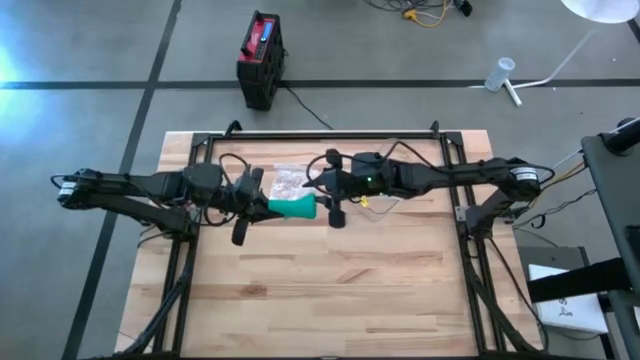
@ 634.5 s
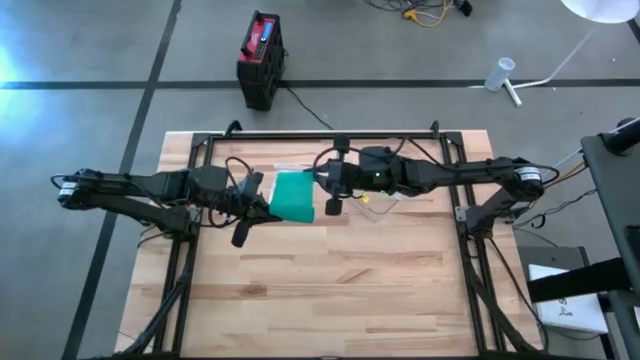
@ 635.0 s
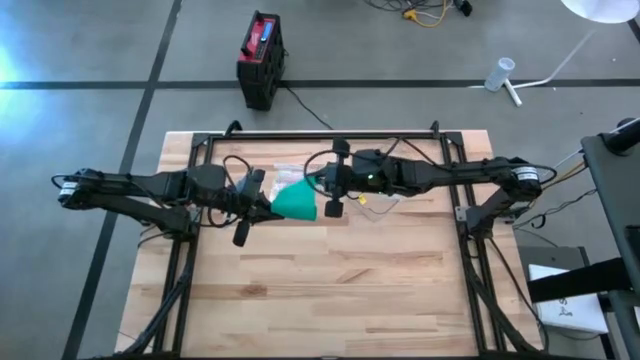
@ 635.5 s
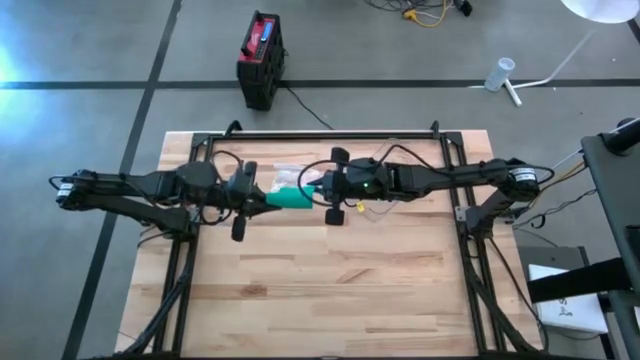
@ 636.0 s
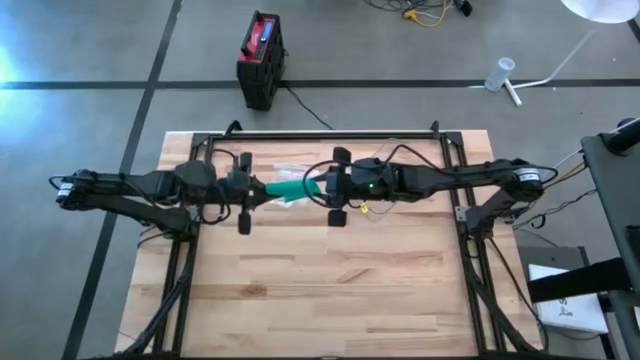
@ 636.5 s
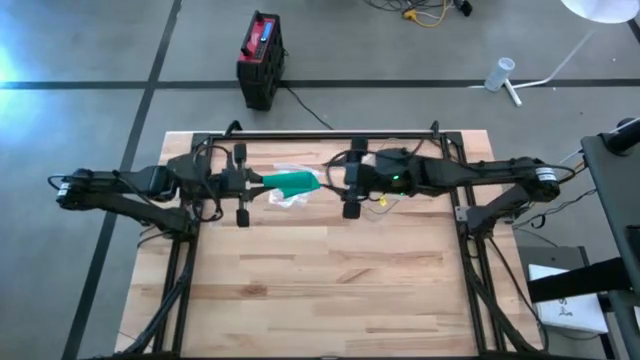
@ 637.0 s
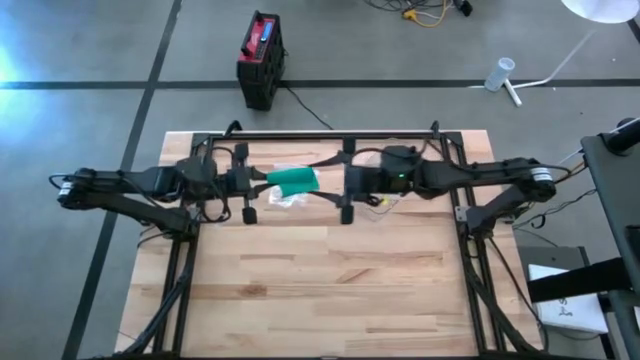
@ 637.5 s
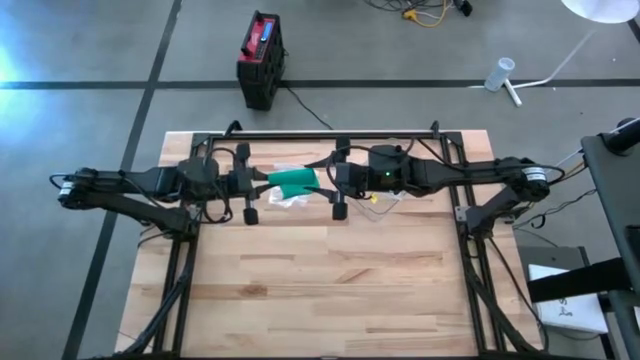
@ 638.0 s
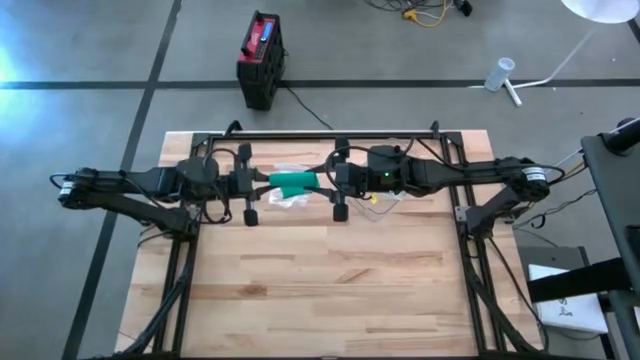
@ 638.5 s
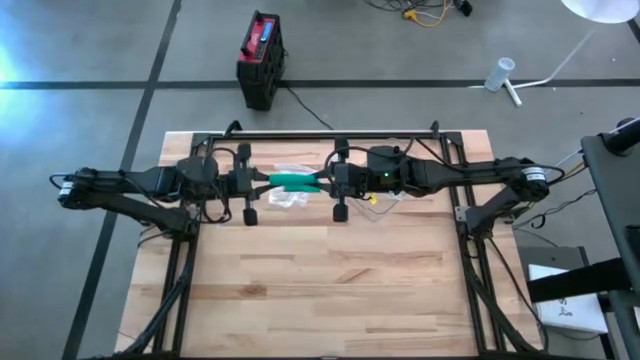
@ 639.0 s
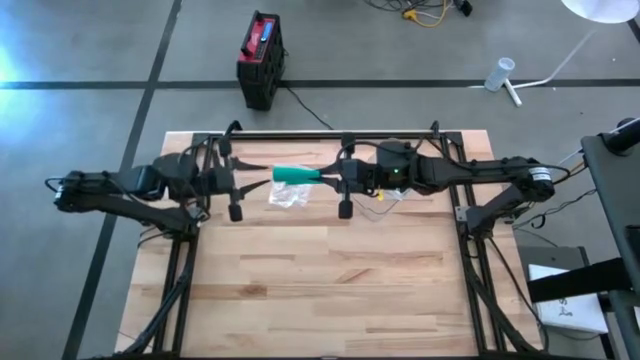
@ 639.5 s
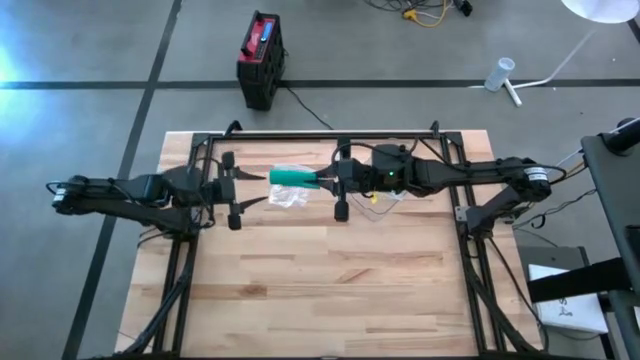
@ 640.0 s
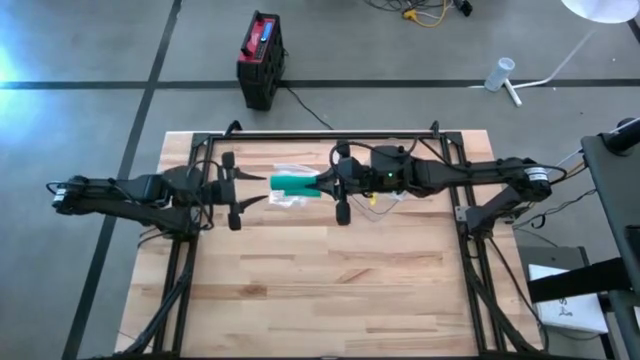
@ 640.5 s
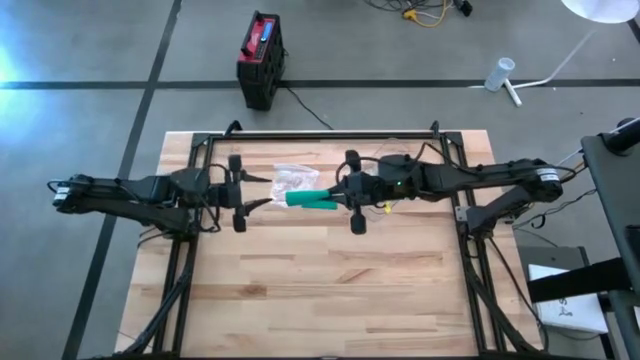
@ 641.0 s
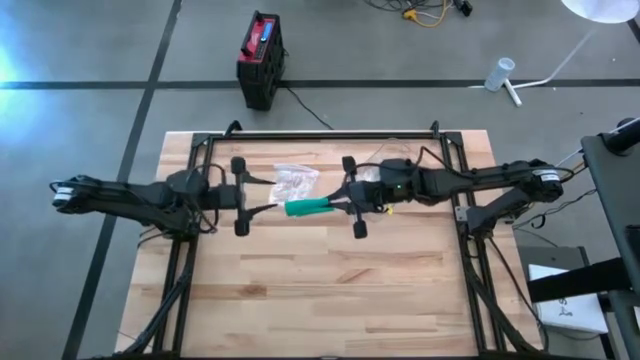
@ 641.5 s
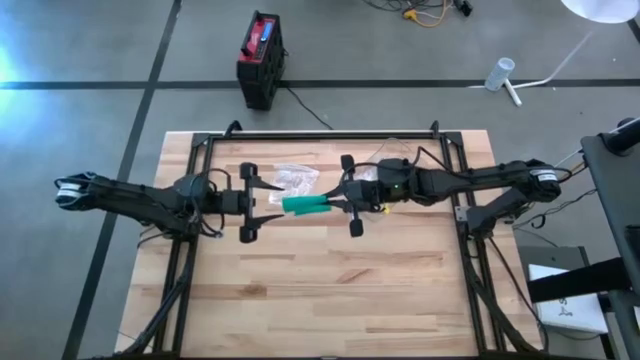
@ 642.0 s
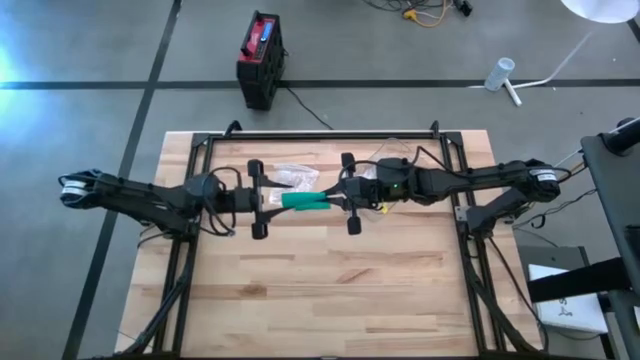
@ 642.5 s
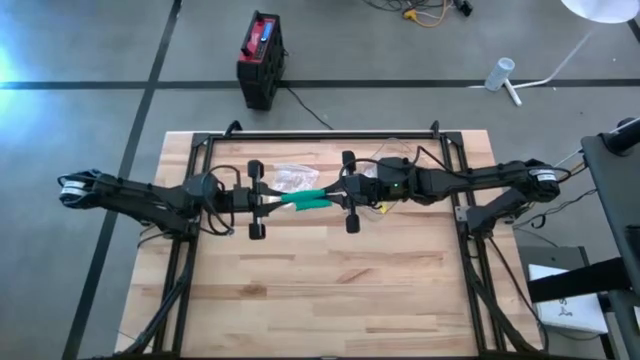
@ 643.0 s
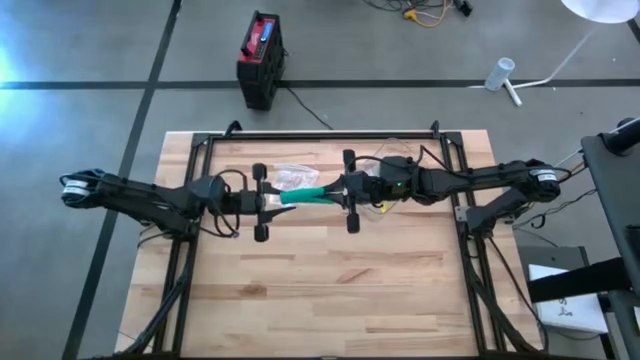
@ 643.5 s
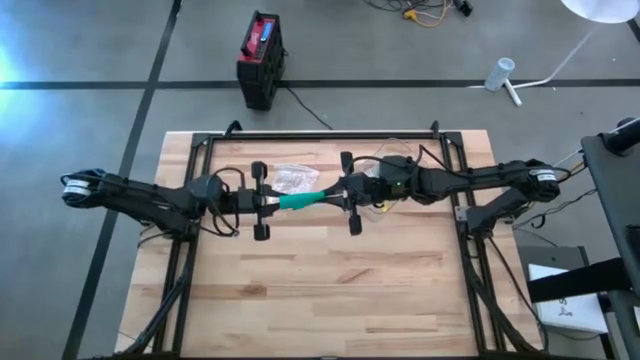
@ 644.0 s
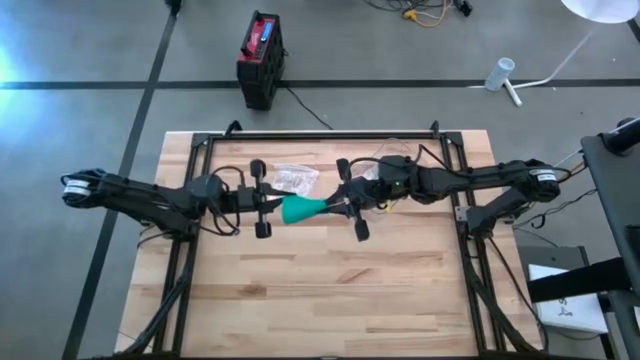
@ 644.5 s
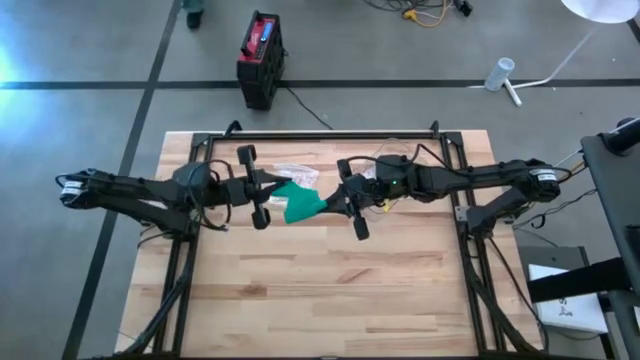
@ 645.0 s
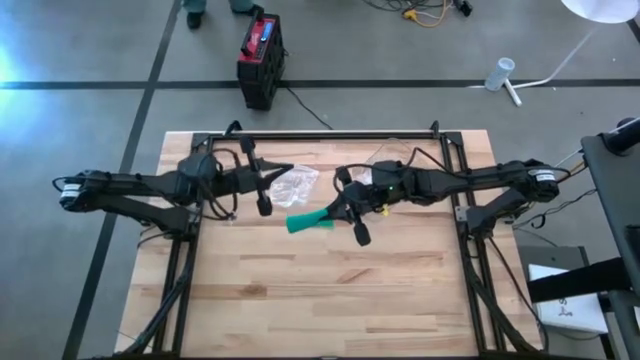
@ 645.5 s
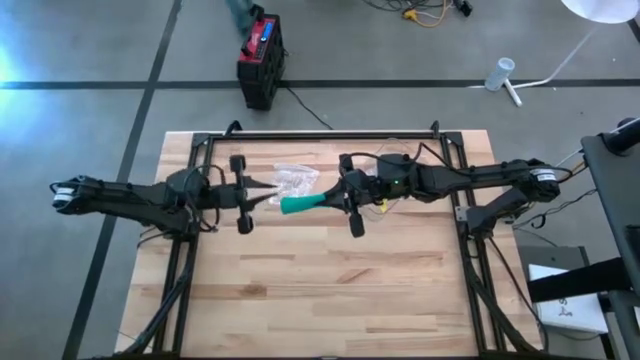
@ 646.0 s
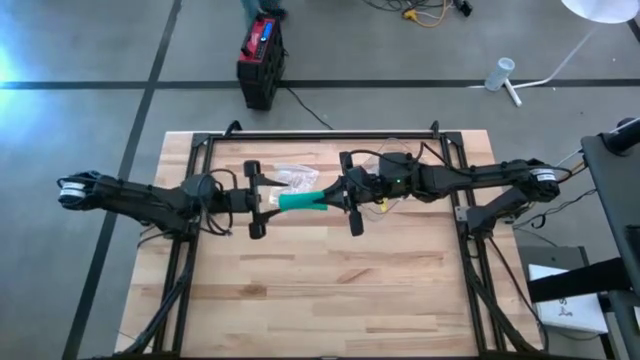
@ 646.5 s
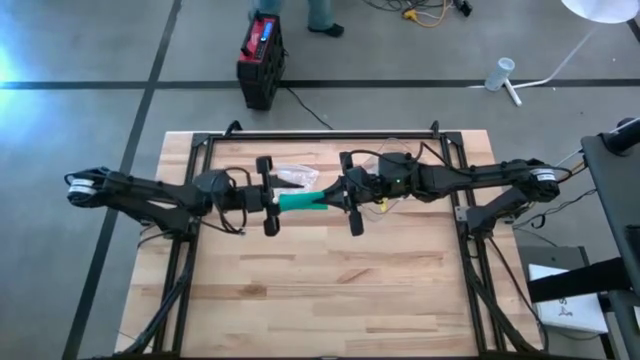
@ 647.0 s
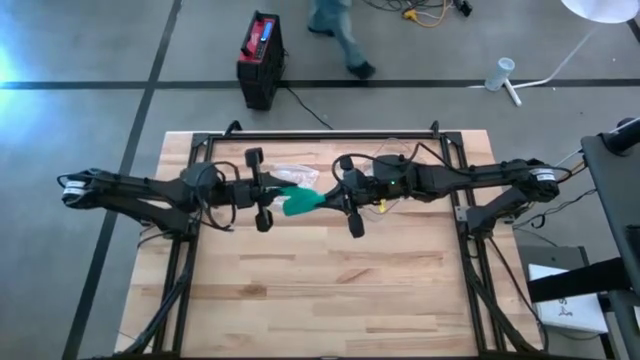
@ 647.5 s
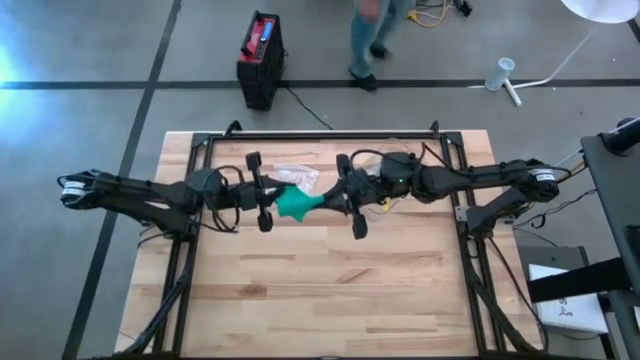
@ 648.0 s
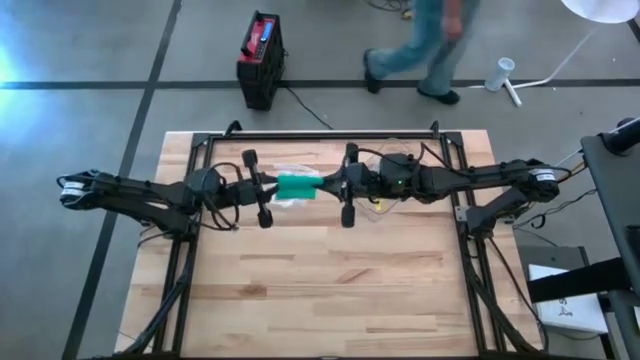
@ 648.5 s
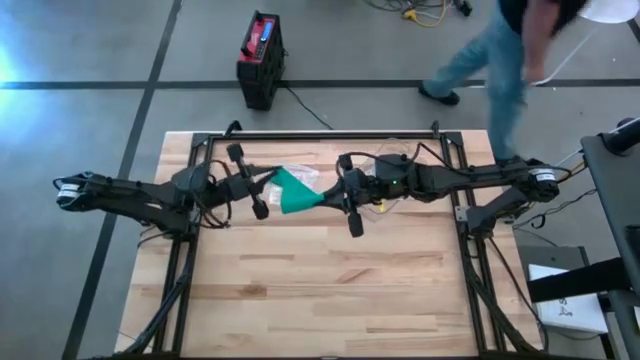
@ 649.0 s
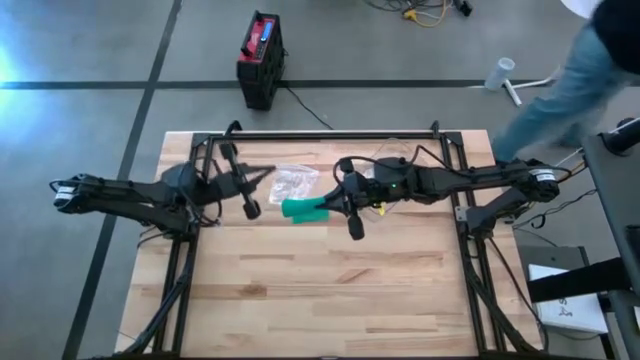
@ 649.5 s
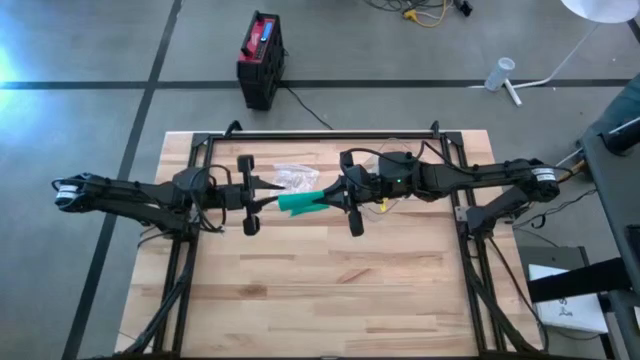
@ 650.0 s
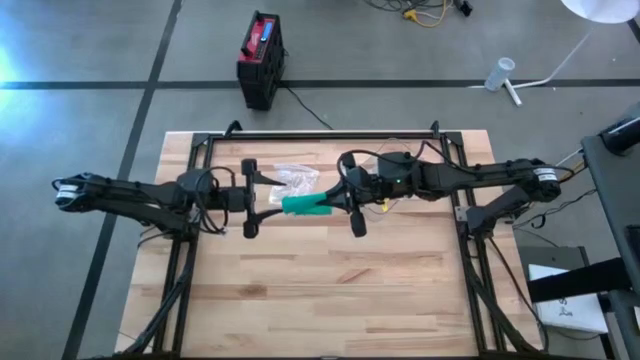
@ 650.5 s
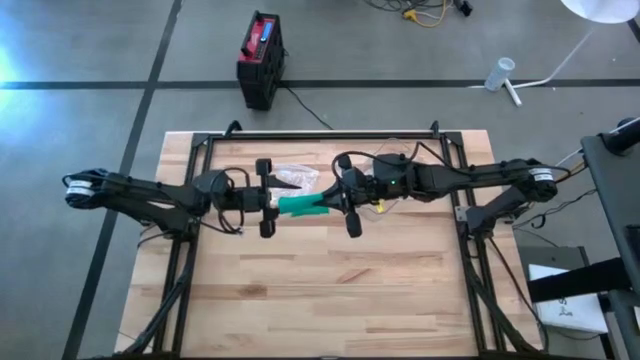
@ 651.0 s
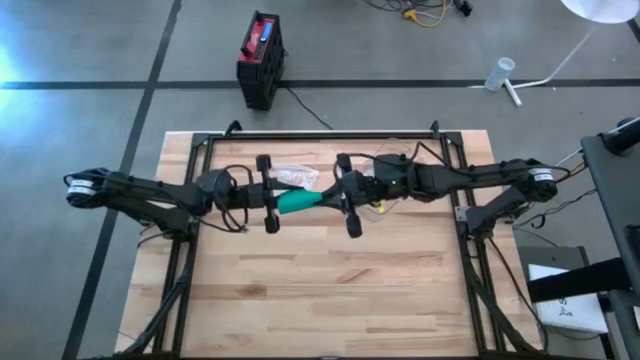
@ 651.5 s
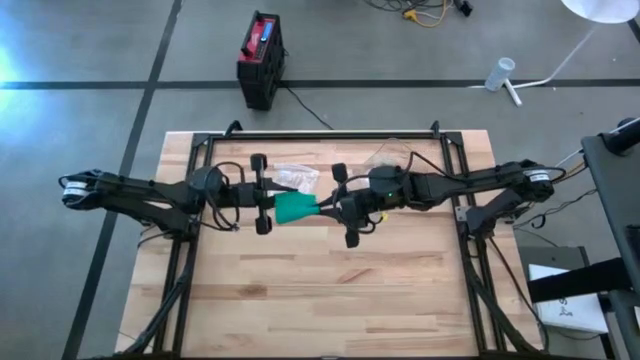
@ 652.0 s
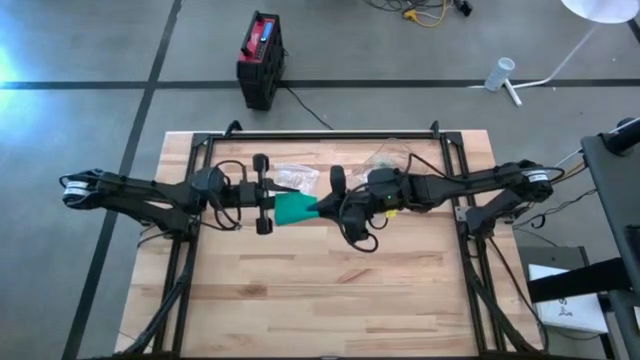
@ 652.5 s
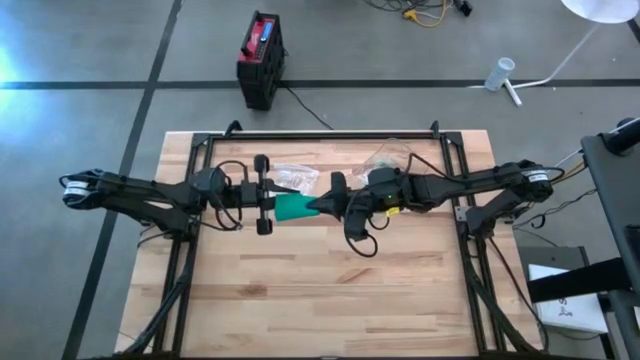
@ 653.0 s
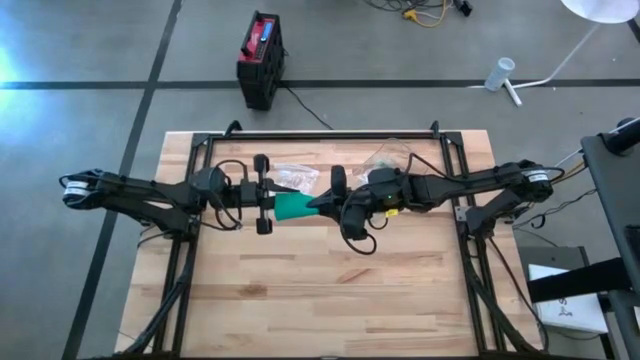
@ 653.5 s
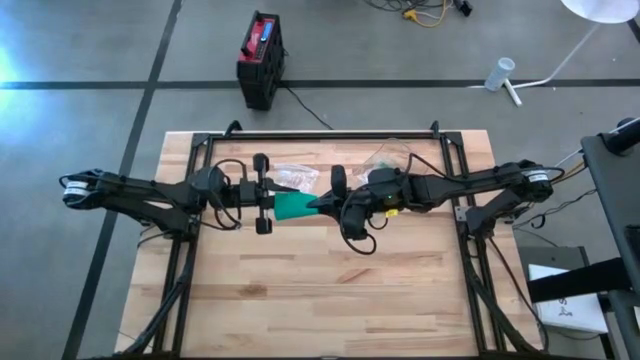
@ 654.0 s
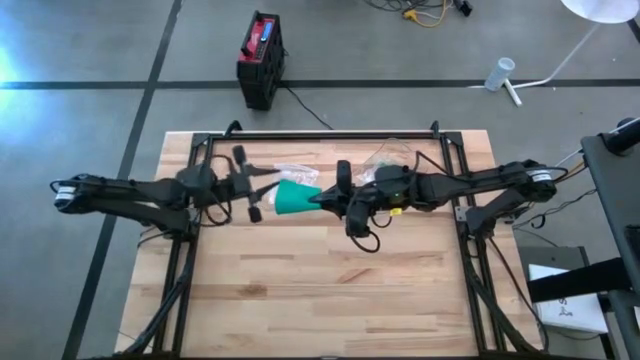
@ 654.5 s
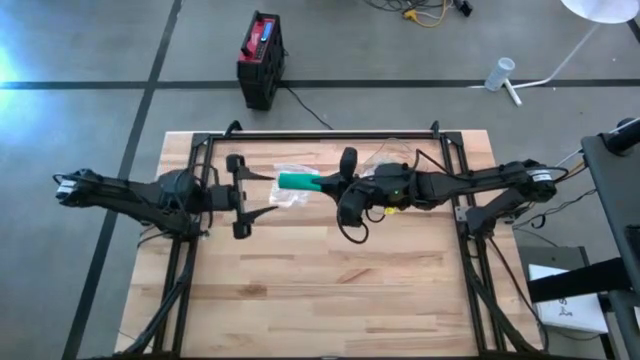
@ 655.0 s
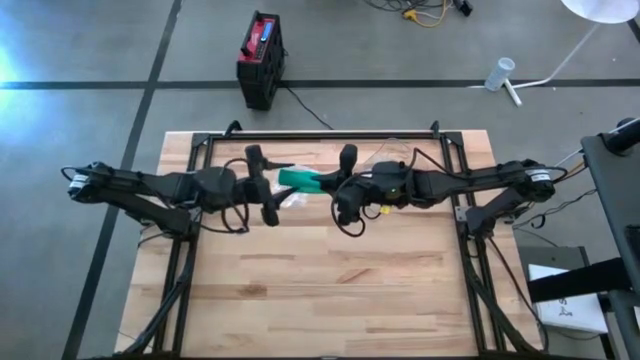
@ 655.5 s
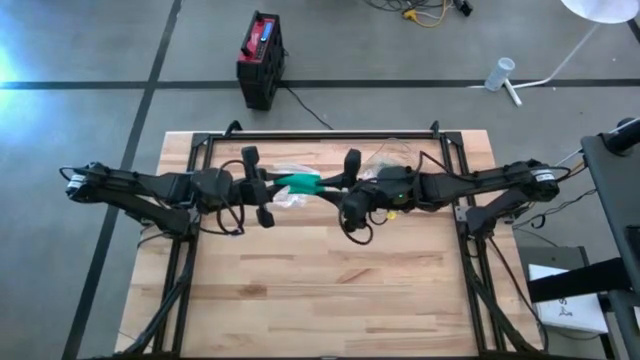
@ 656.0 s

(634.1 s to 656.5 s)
Task: Roll bandage
Roll the dark green bandage
